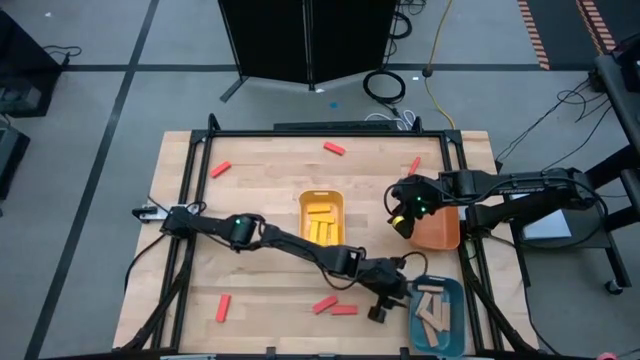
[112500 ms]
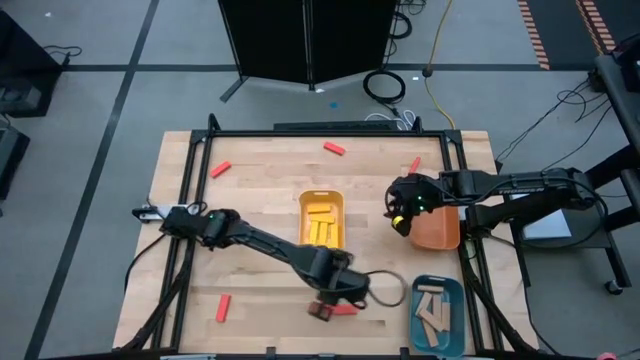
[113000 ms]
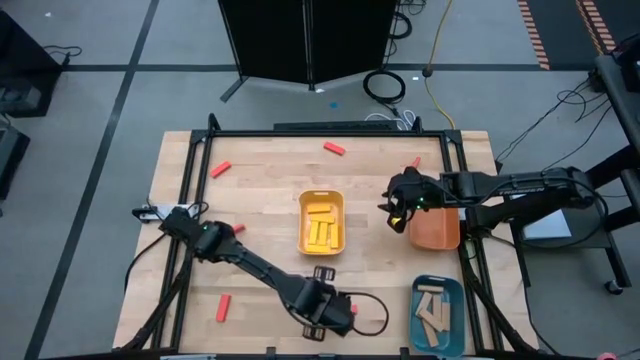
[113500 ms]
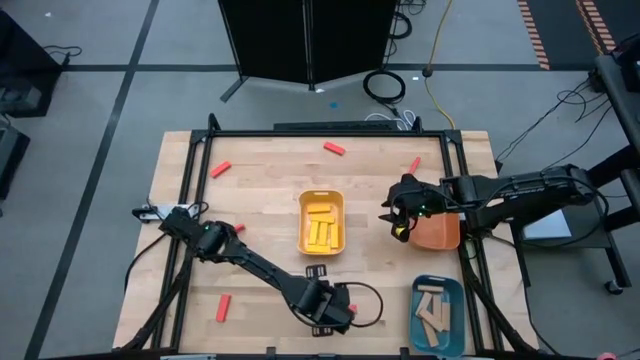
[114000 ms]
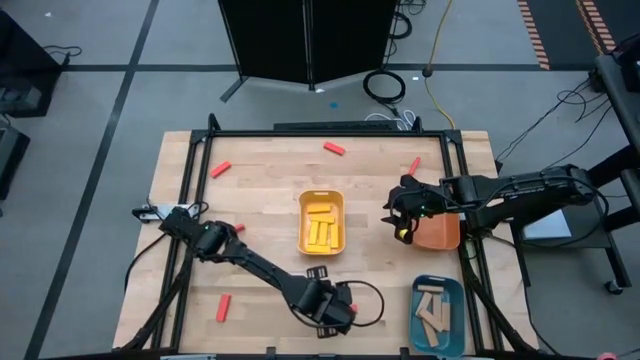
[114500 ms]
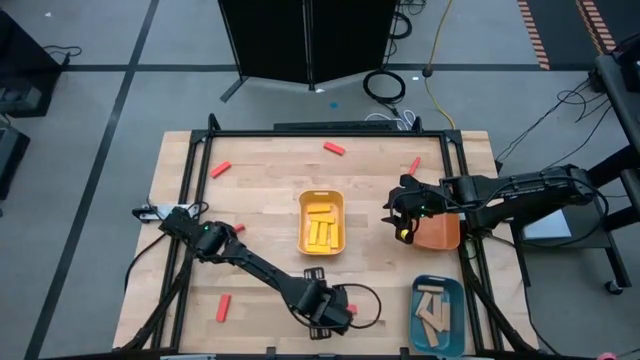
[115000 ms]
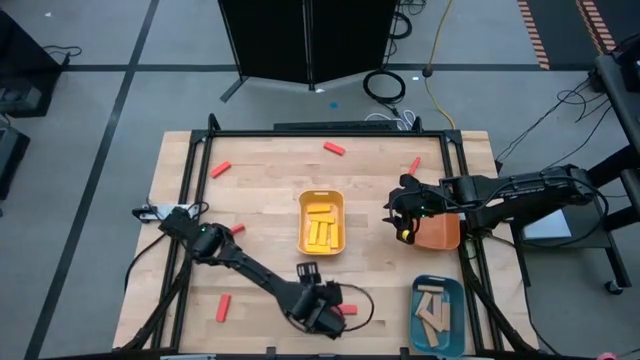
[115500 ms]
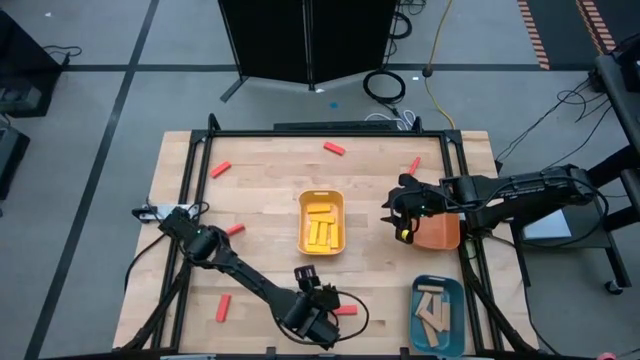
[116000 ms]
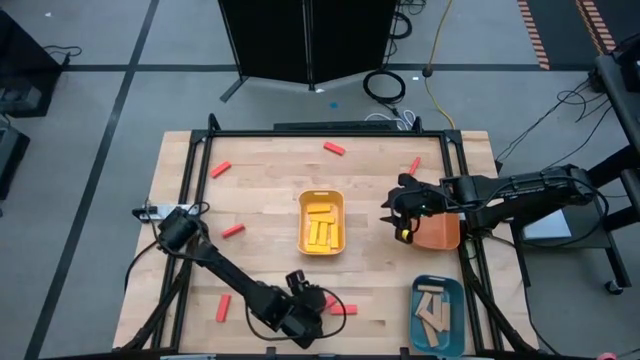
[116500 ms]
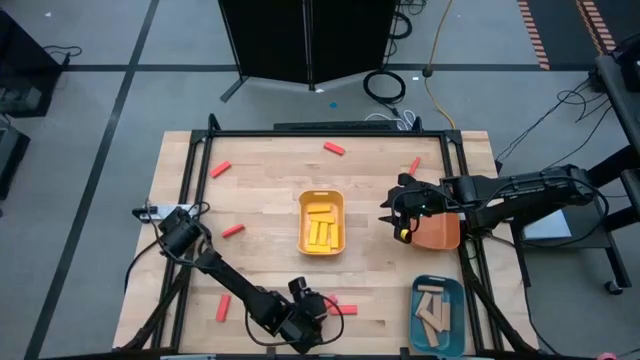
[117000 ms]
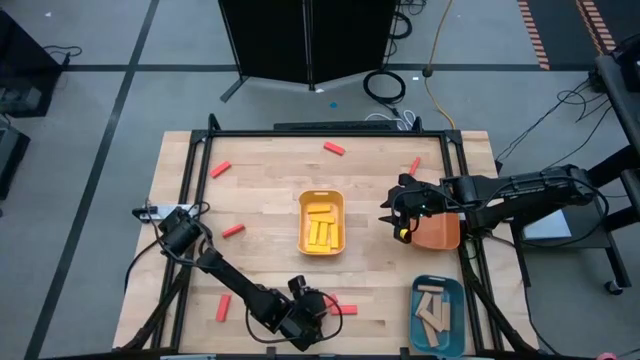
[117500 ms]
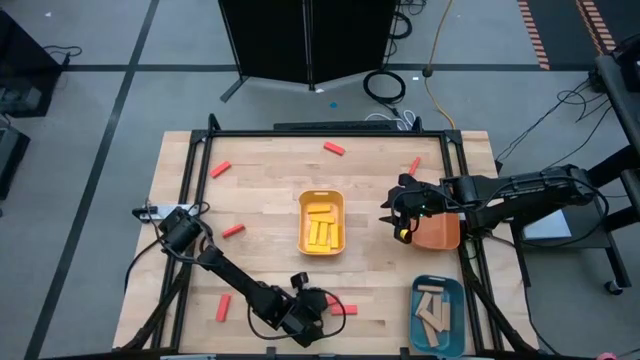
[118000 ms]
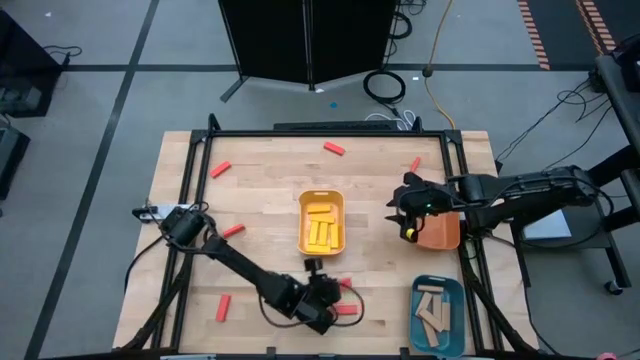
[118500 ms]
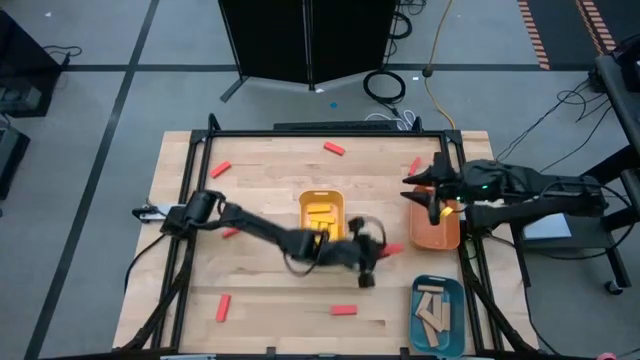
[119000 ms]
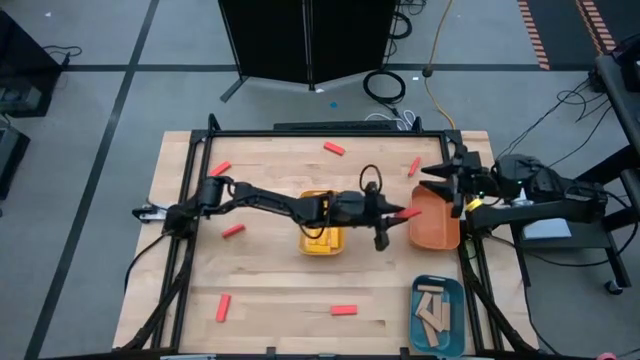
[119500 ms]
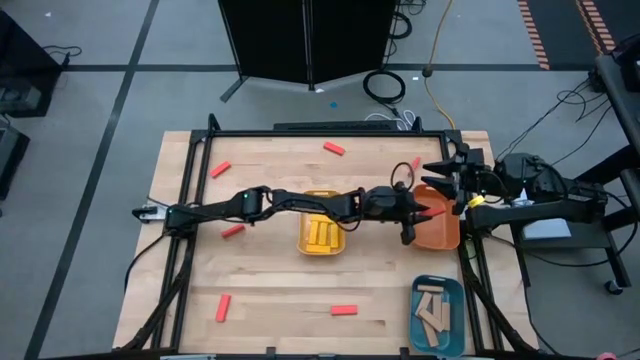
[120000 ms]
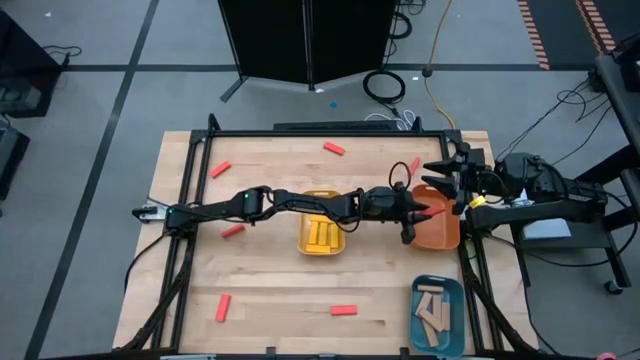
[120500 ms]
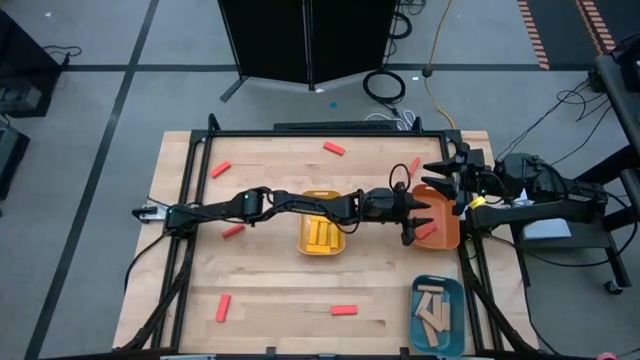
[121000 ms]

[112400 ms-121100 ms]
Task: Sort blocks
Put the orange wooden block into the orange bin

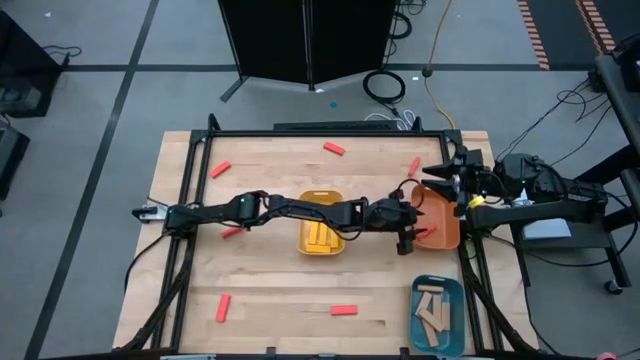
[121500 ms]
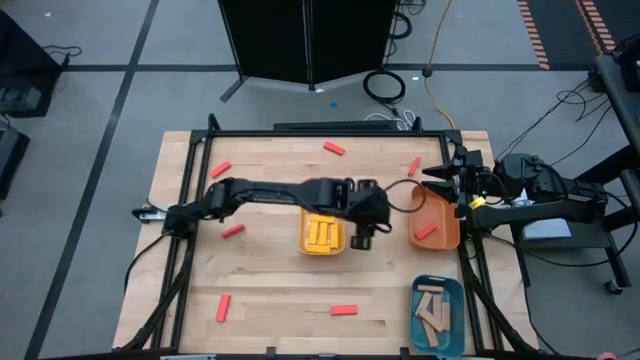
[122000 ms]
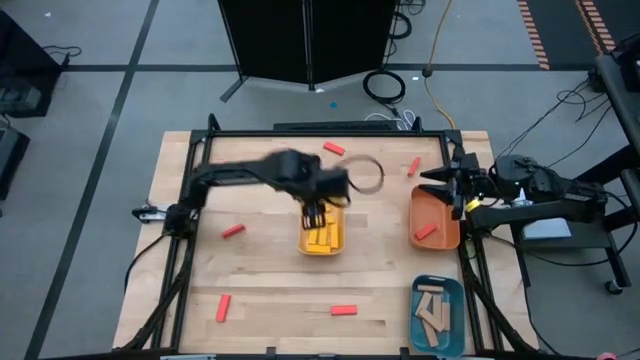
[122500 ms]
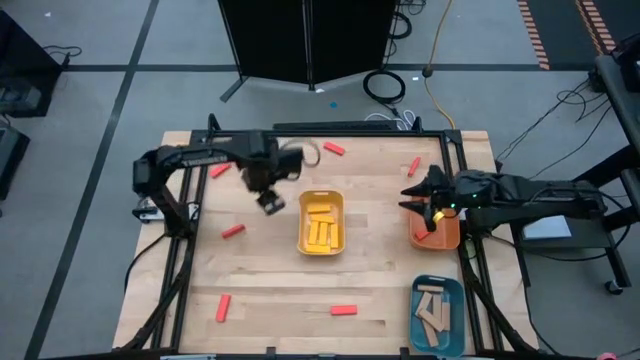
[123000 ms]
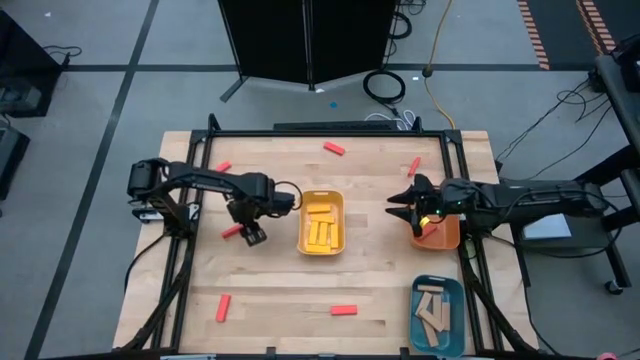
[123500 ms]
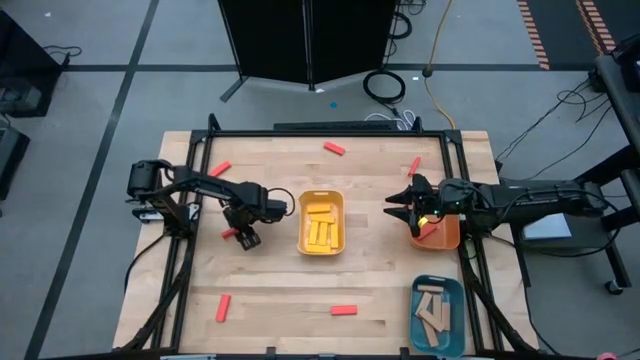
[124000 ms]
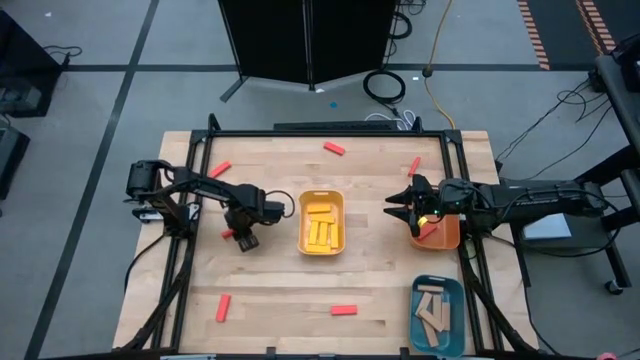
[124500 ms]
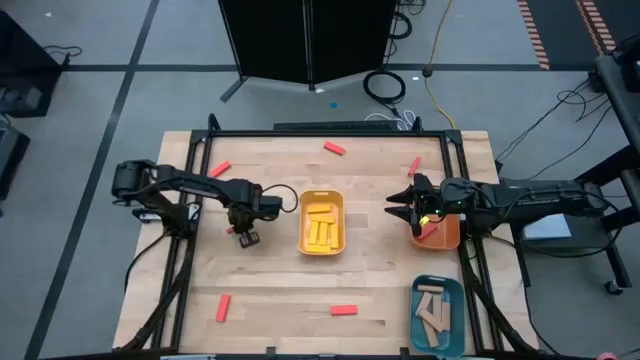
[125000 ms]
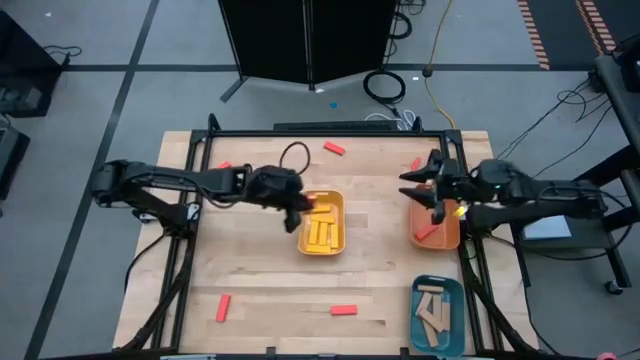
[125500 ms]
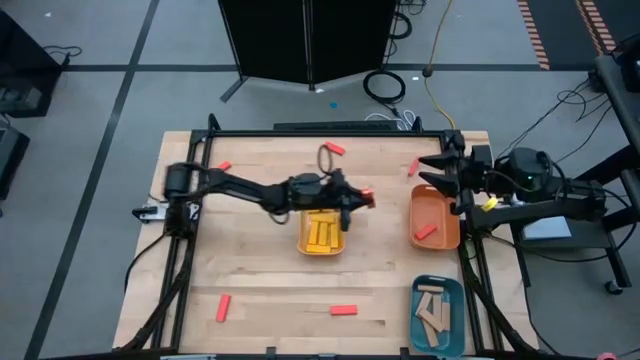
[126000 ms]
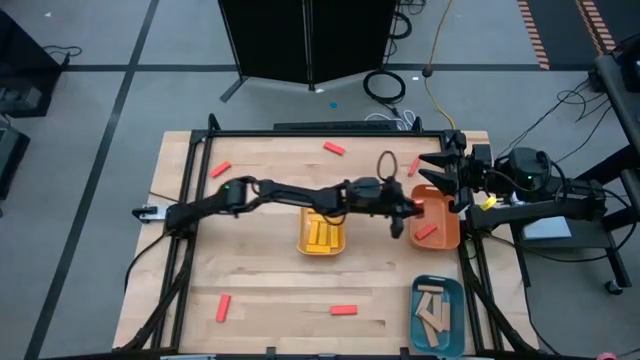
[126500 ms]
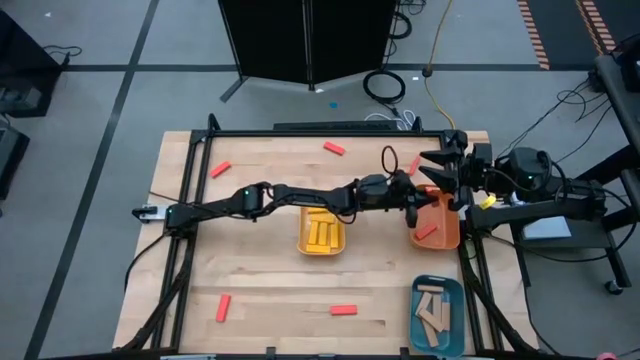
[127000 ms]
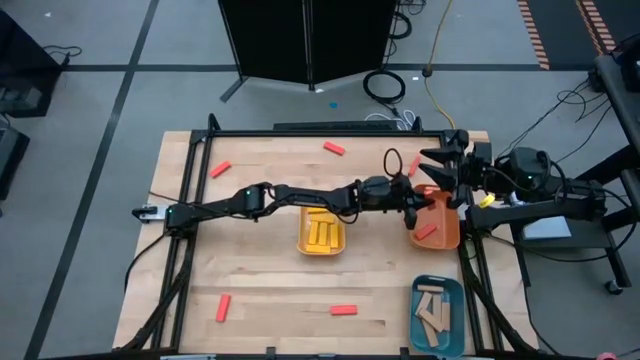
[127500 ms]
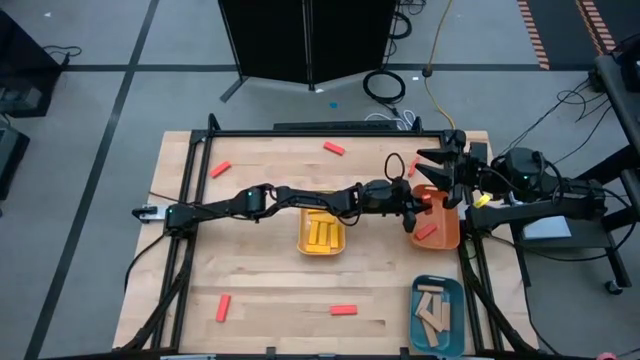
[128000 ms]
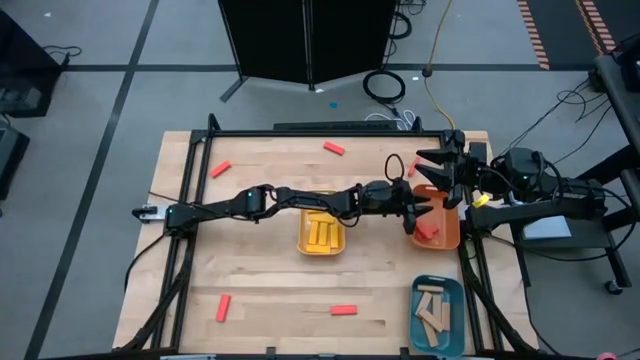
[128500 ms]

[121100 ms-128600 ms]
Put the orange wooden block into the orange bin

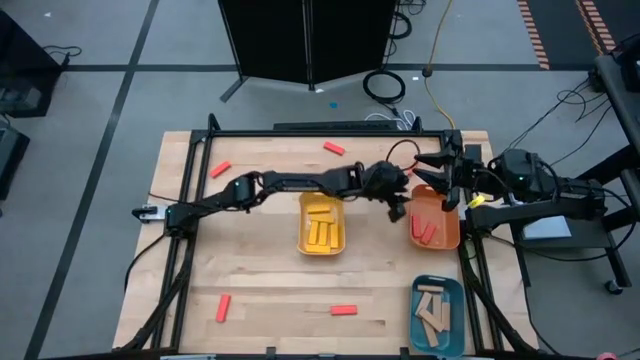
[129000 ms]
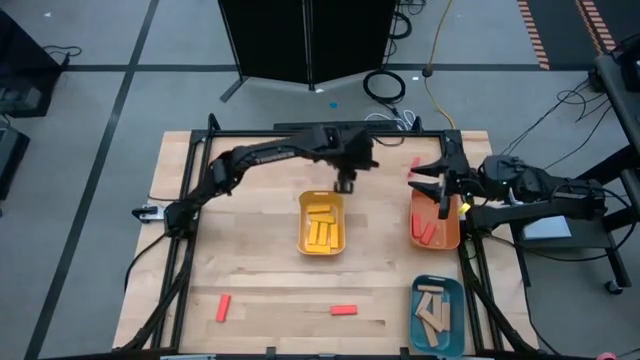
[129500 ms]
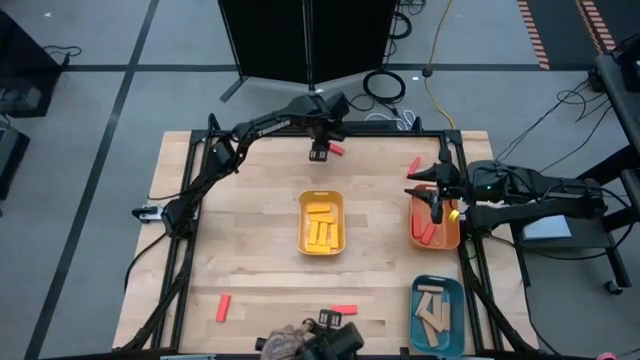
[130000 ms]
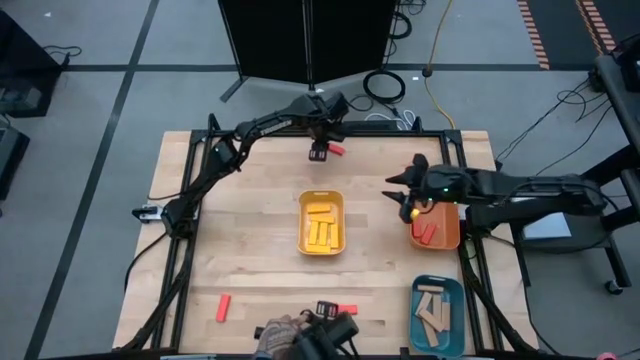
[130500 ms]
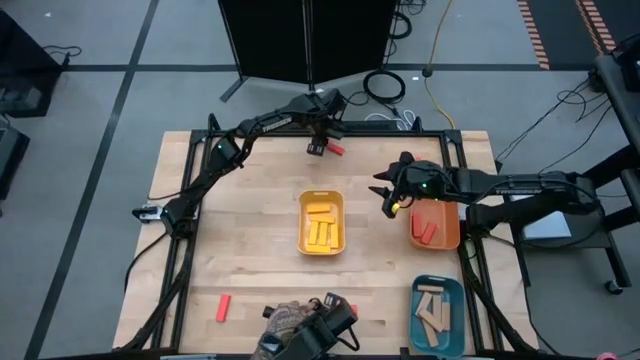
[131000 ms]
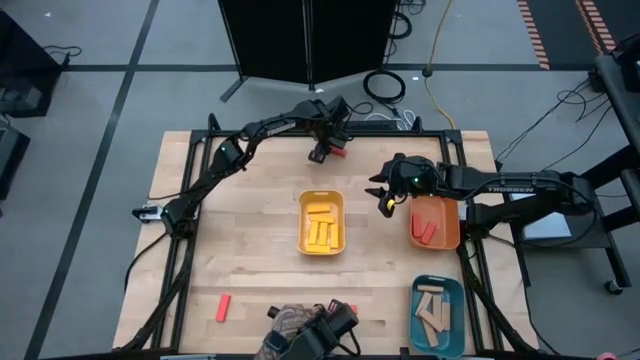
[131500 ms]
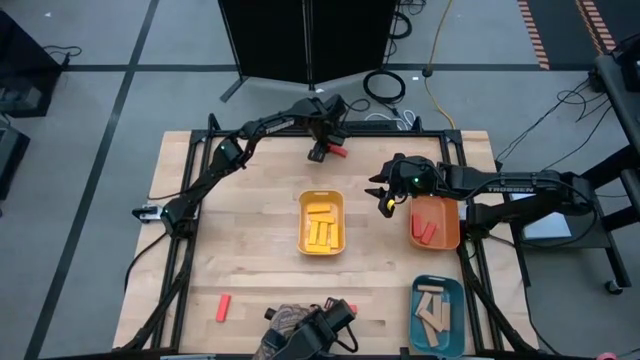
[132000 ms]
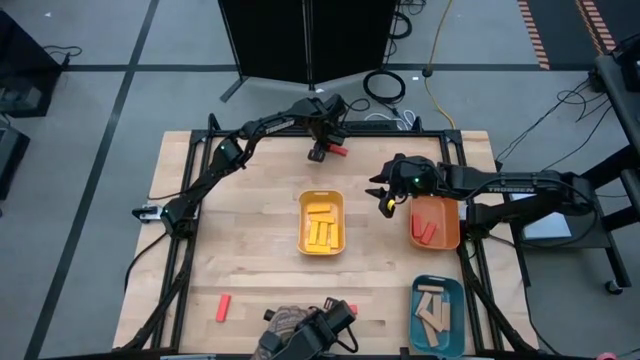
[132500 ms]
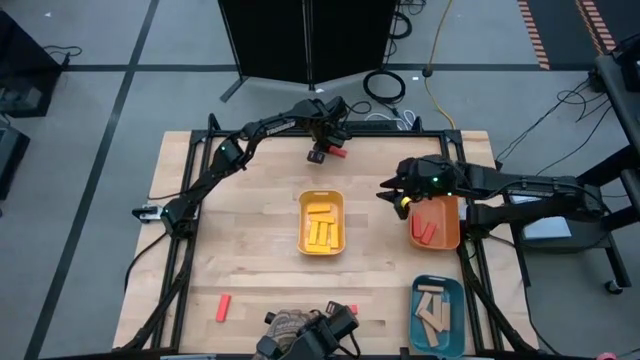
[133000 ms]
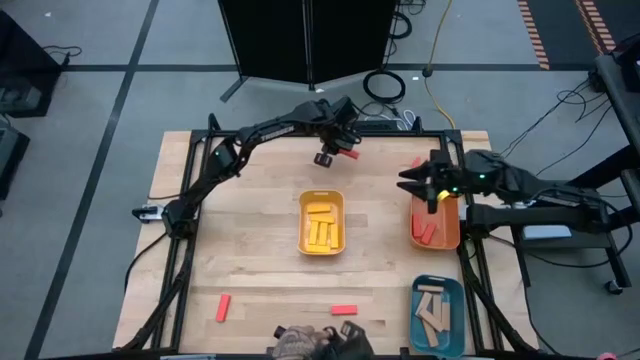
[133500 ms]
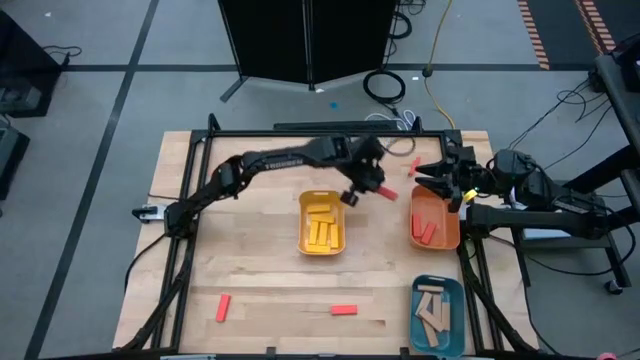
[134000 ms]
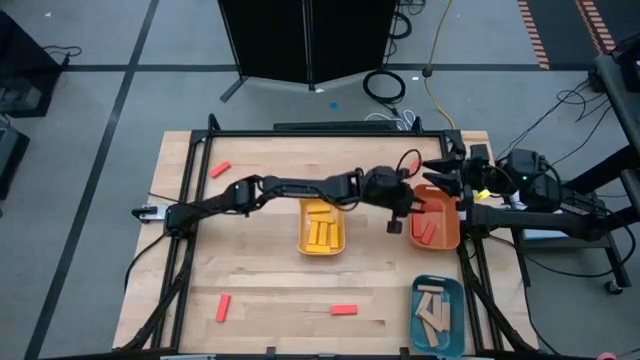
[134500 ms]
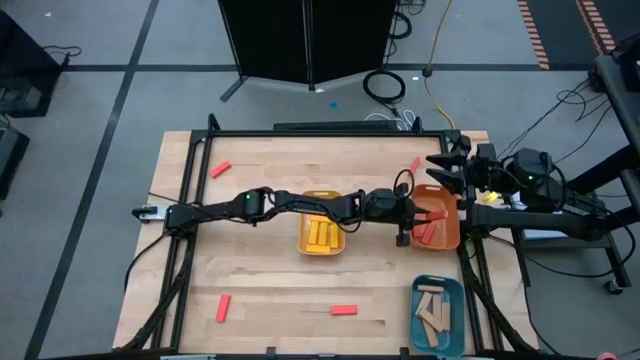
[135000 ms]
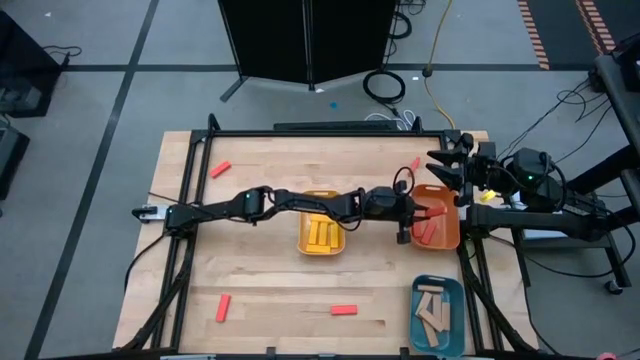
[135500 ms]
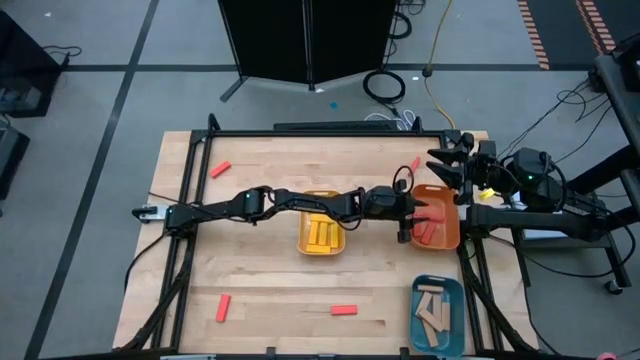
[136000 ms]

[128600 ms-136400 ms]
Put the orange wooden block into the orange bin
